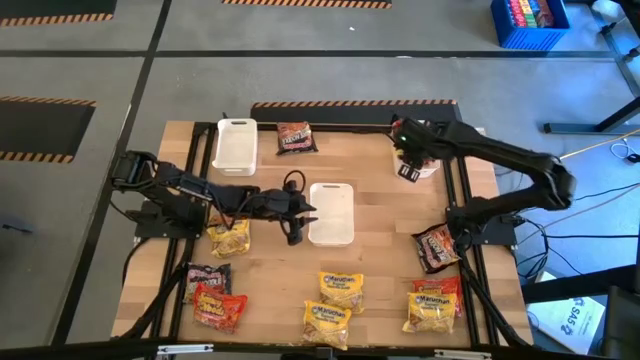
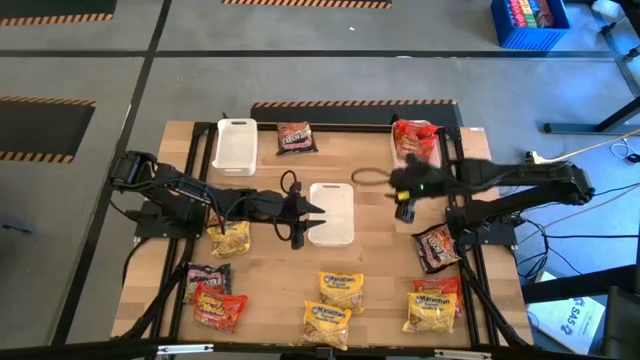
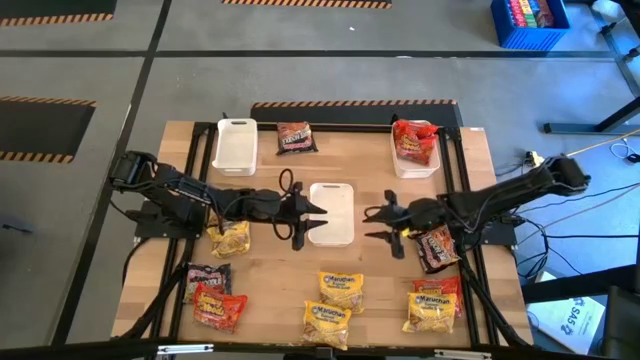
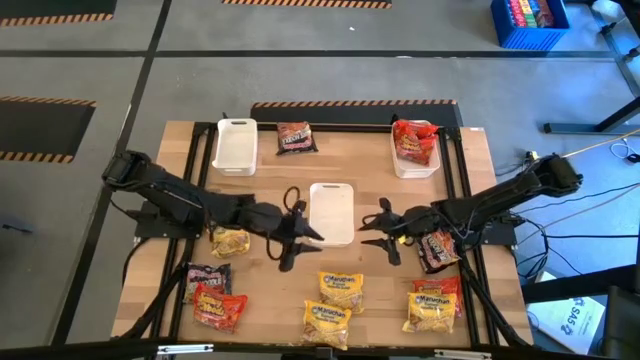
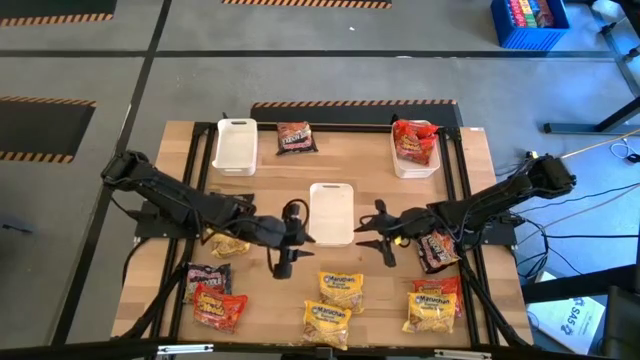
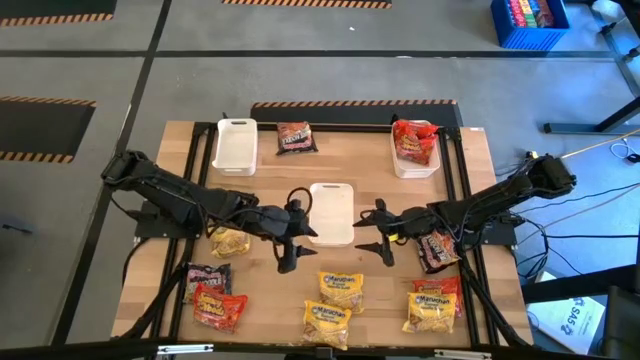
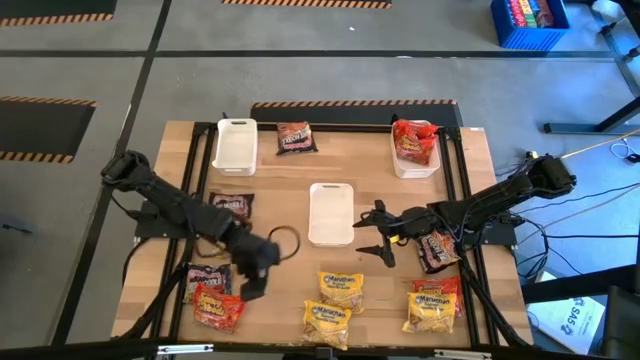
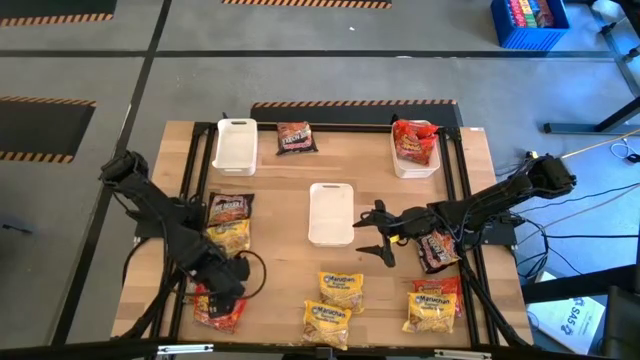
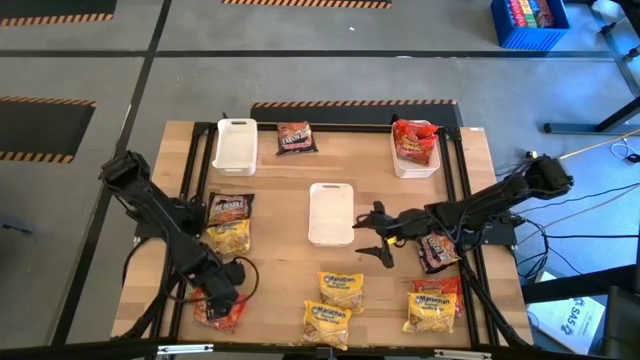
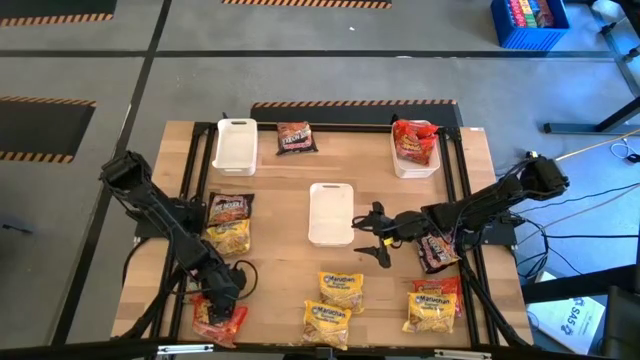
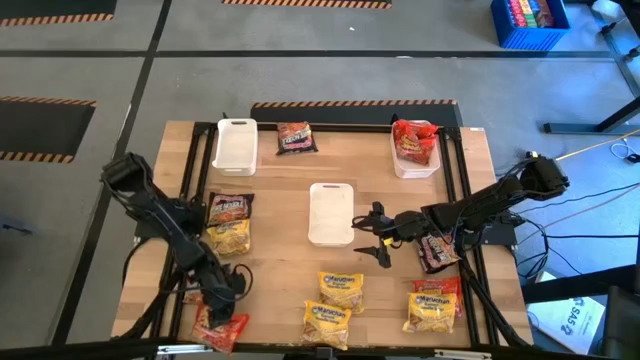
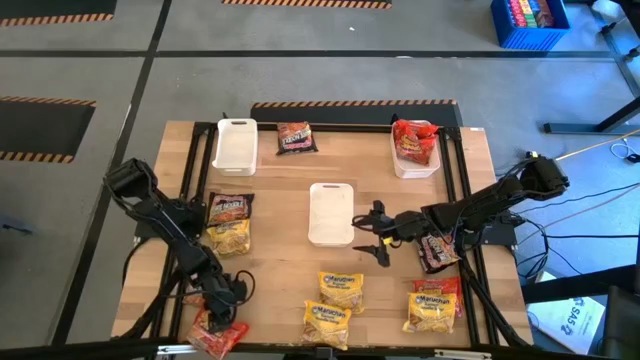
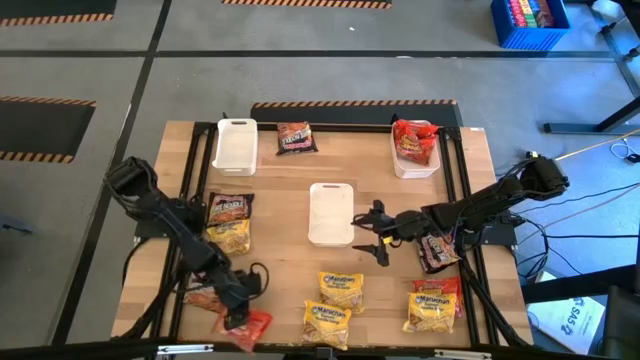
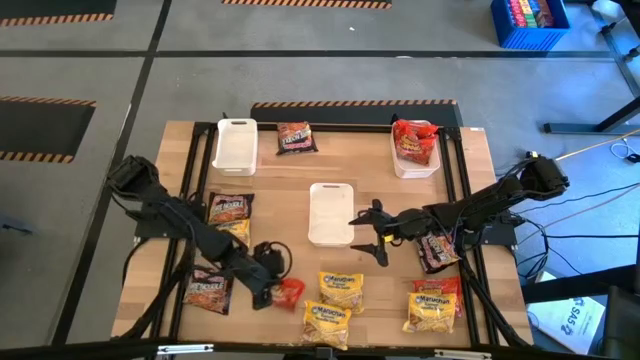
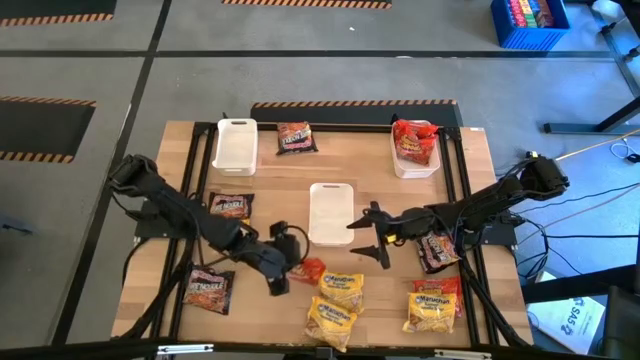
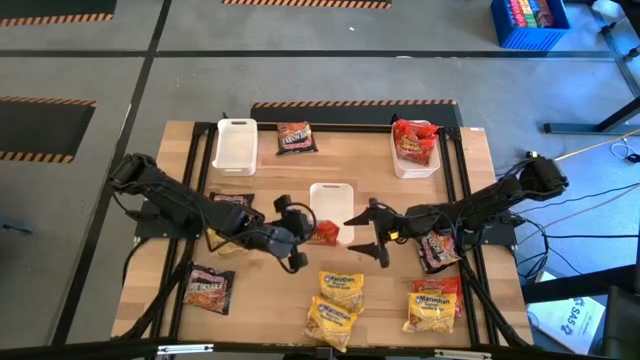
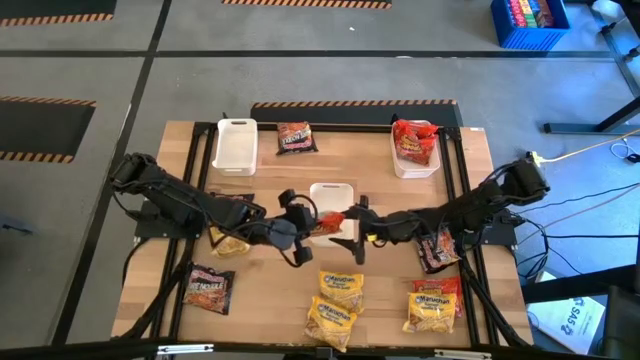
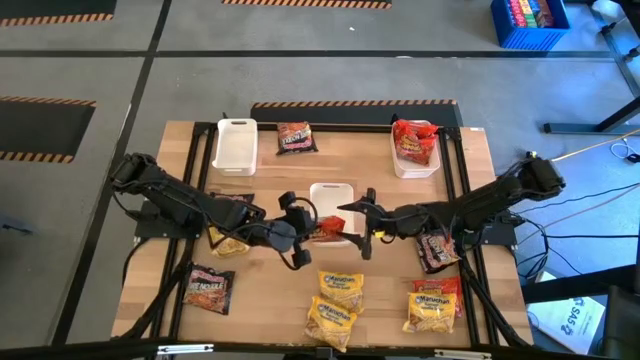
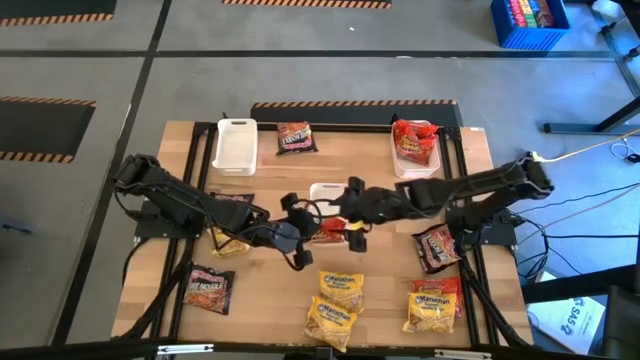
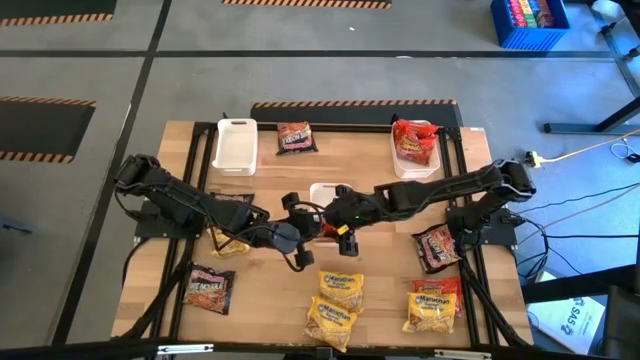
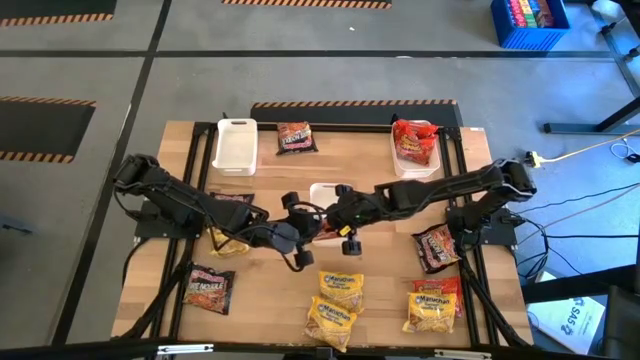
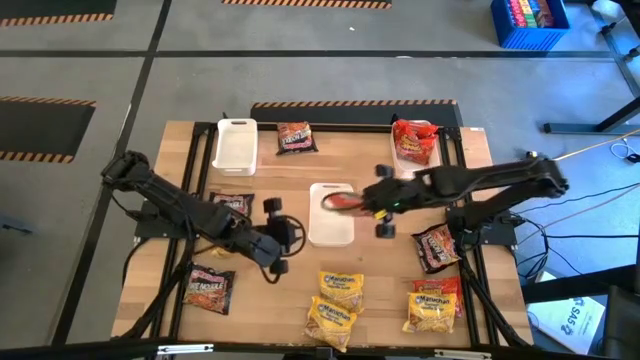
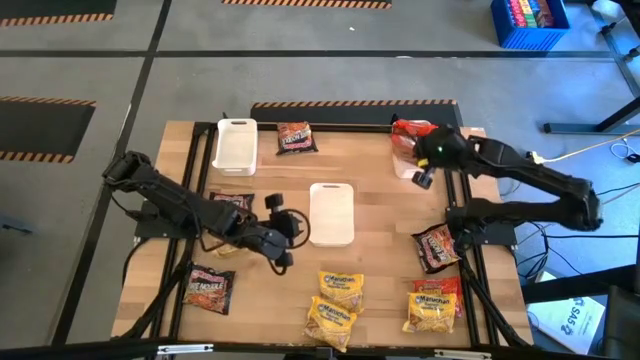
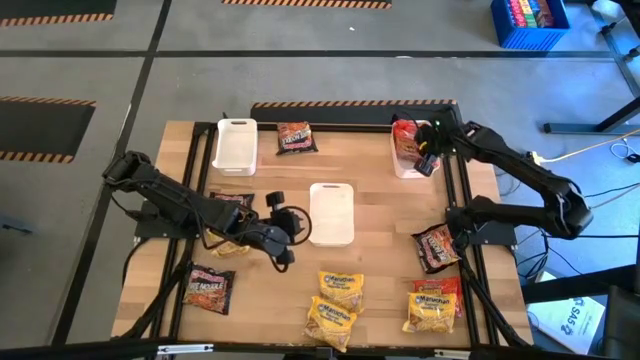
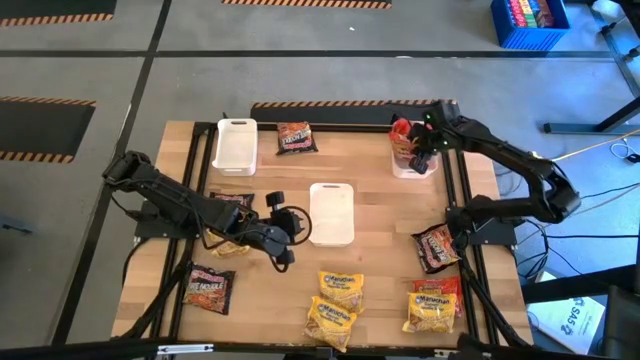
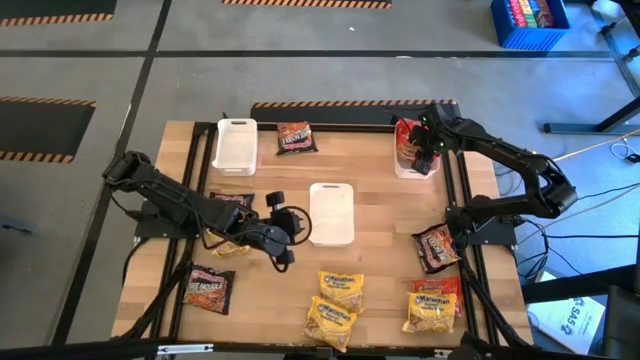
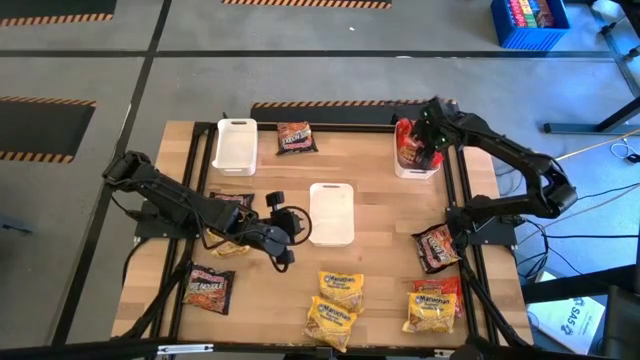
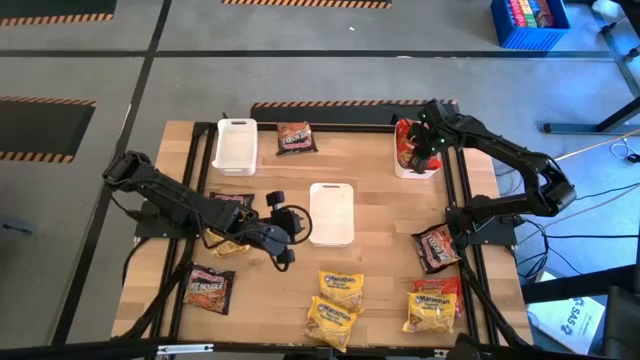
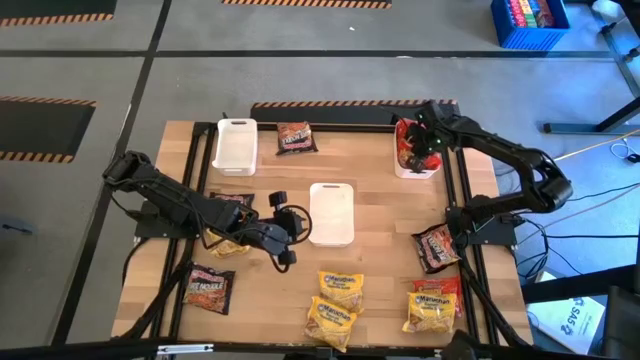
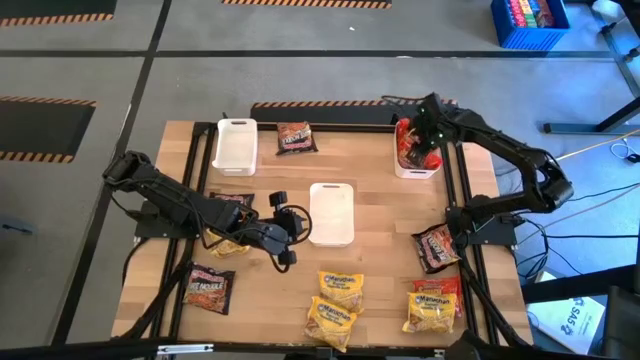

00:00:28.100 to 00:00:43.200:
Task: Sort Maruchan noodles
Put the orange noodle pack into the white right bin

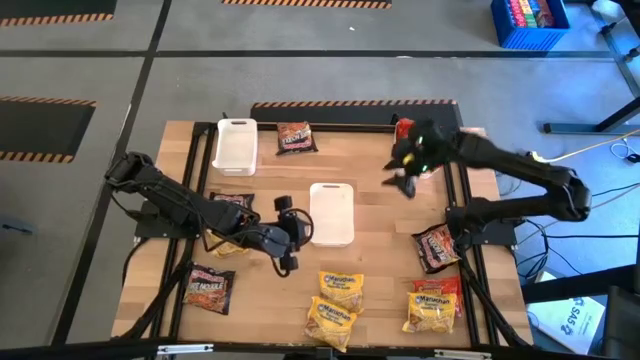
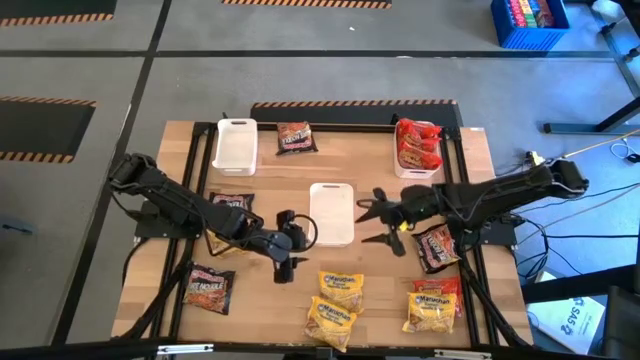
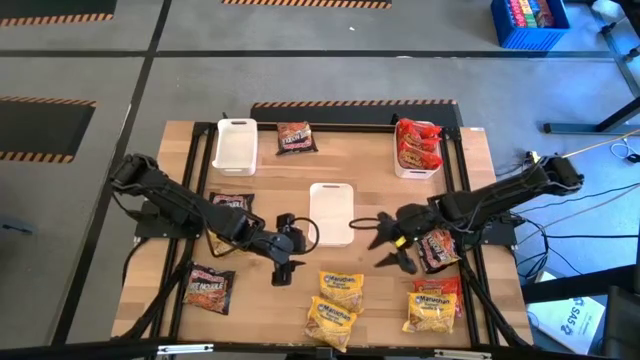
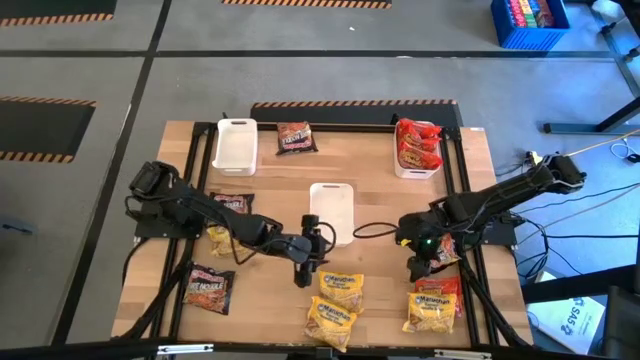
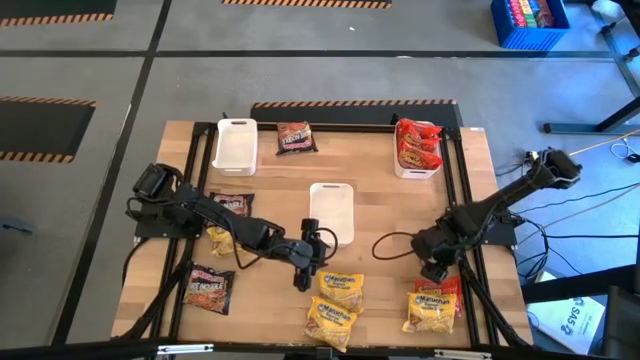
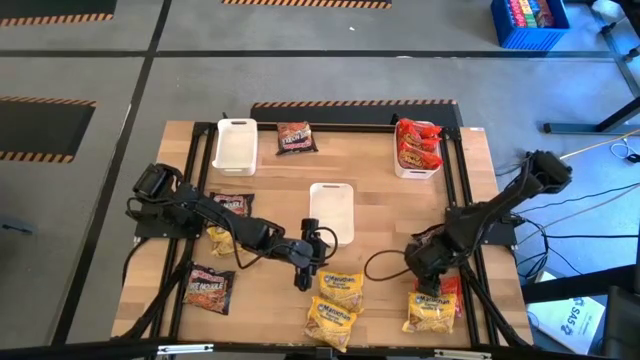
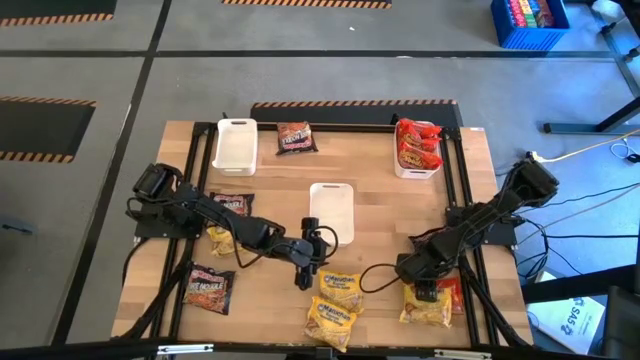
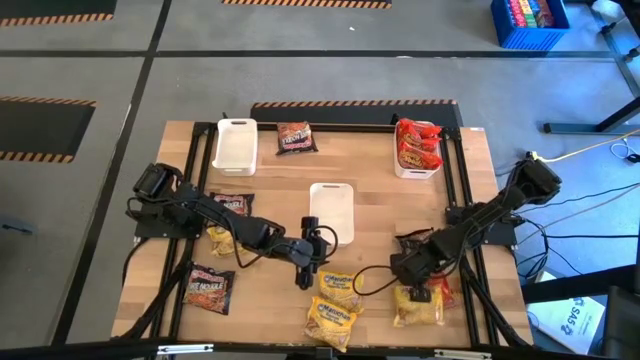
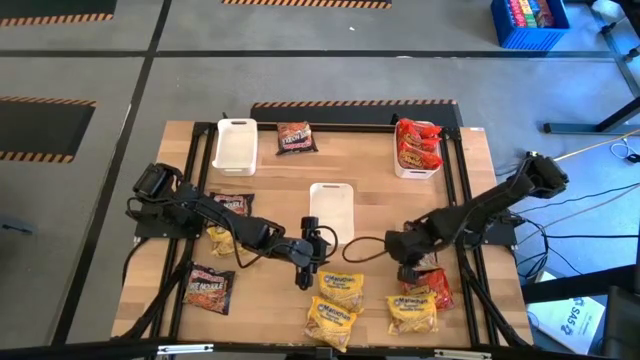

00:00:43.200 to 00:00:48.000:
Put the orange noodle pack into the white right bin

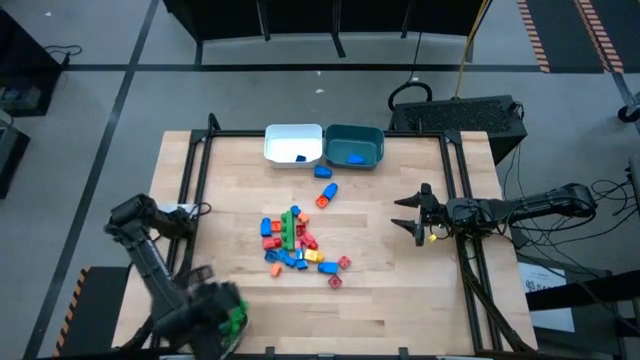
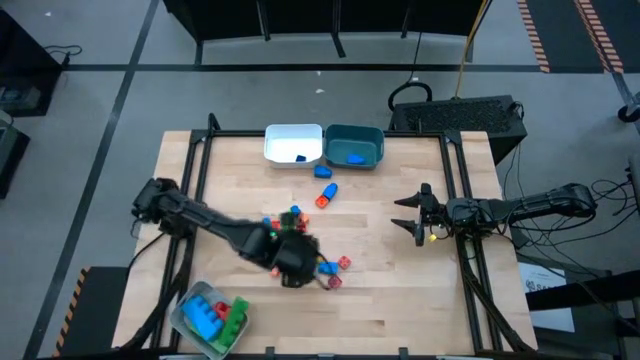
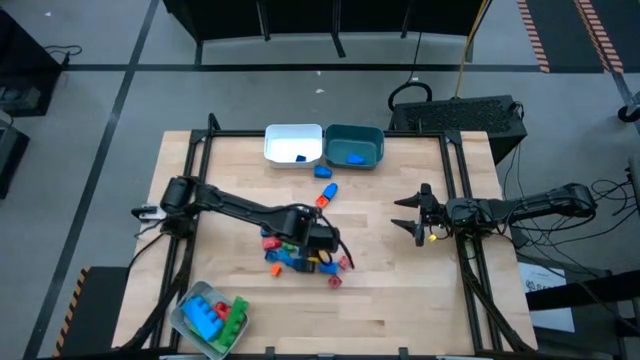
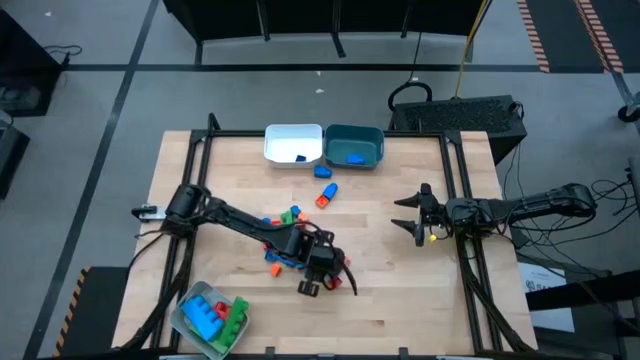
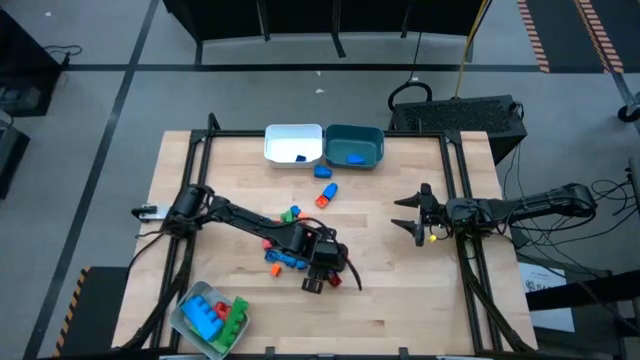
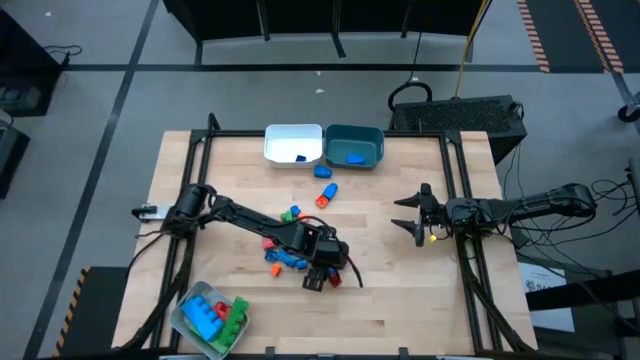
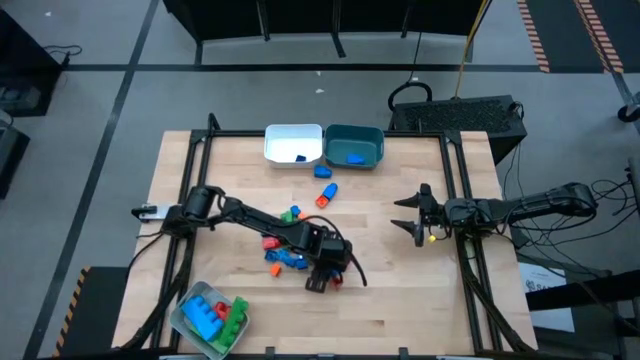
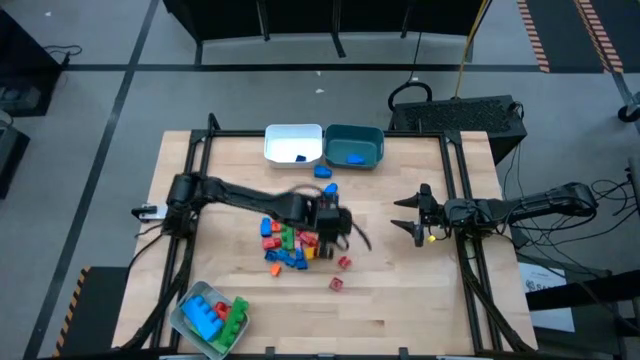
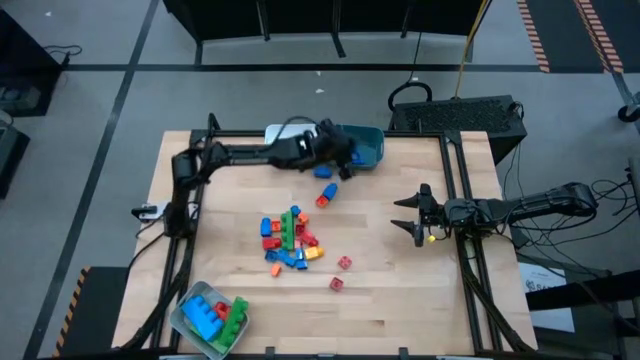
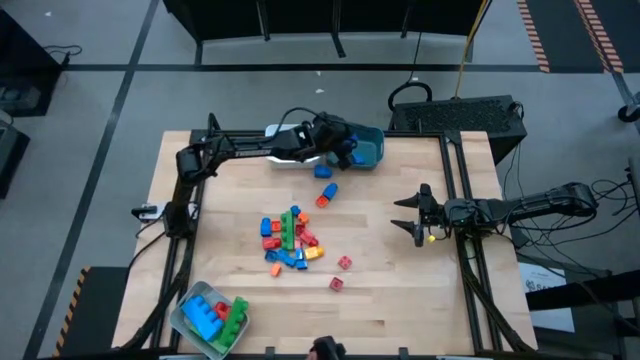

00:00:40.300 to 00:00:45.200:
Task: Sort blocks by size
Put the blue 1 stud game piece into the blue bin
